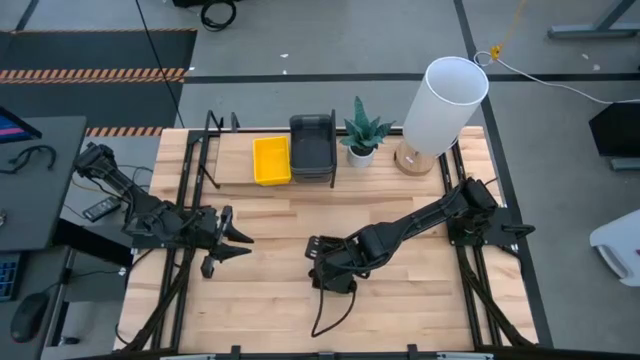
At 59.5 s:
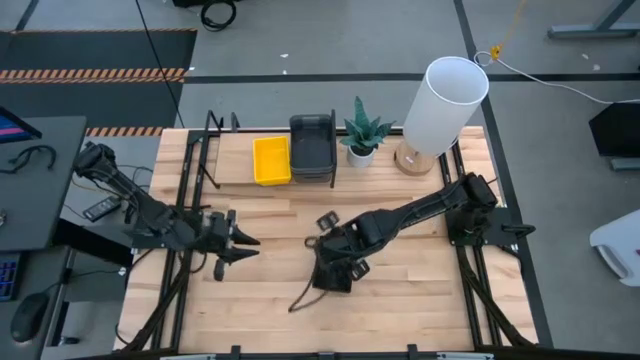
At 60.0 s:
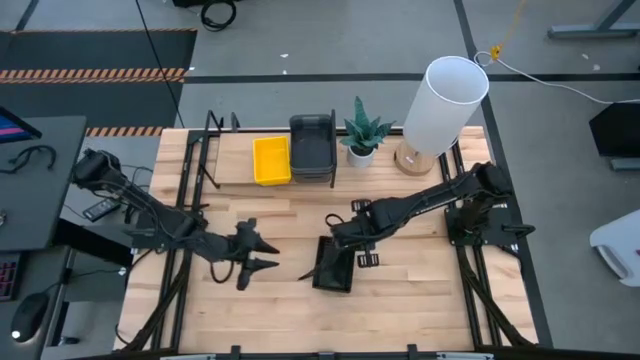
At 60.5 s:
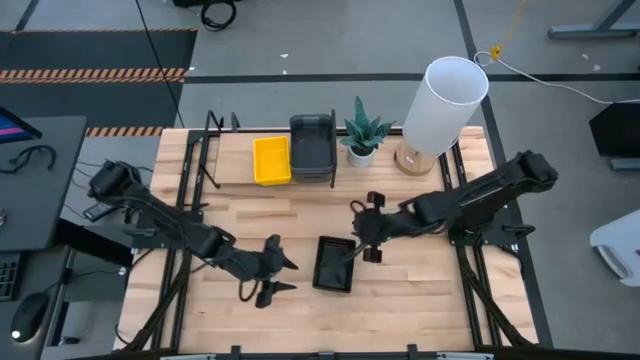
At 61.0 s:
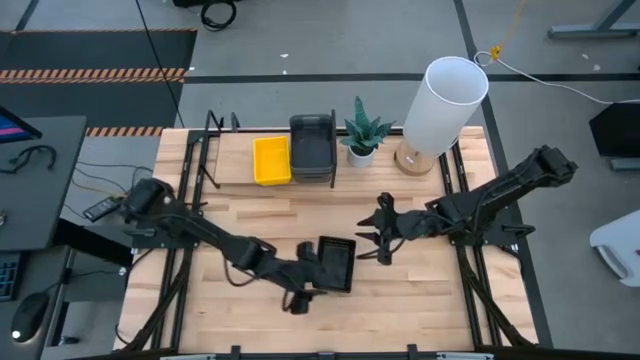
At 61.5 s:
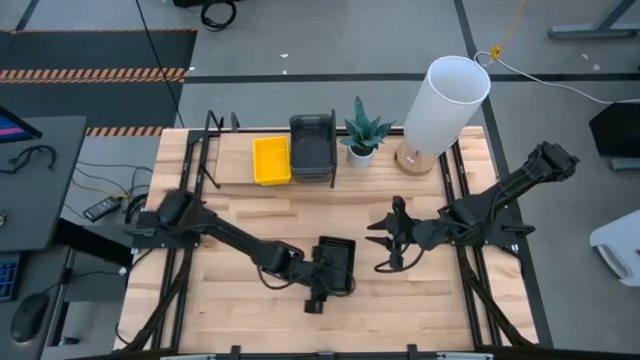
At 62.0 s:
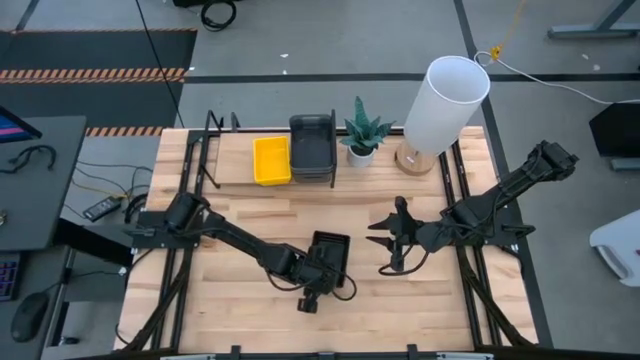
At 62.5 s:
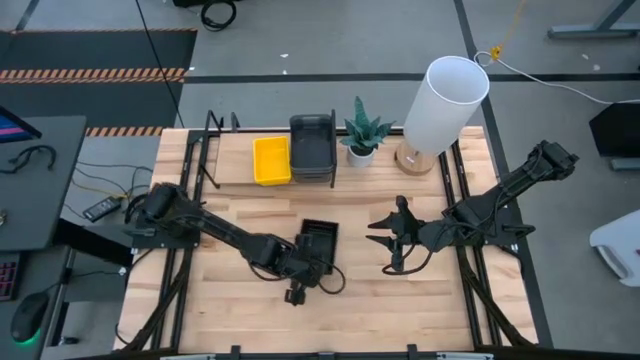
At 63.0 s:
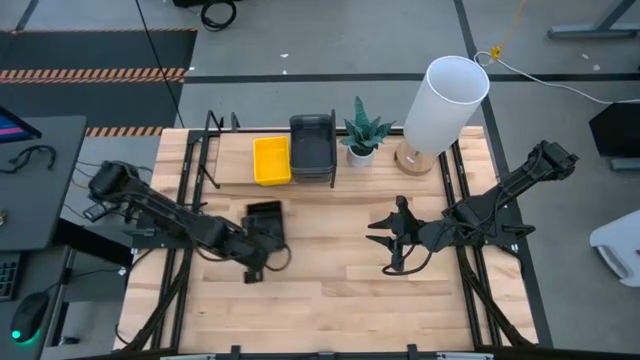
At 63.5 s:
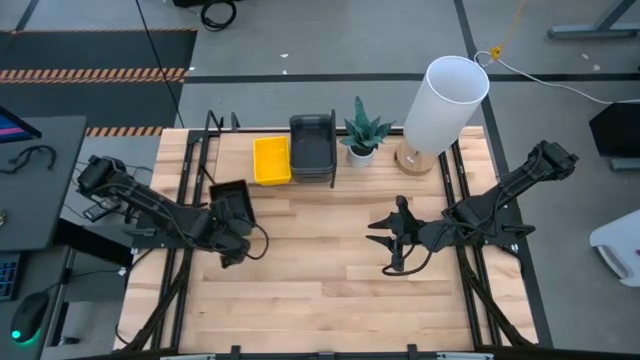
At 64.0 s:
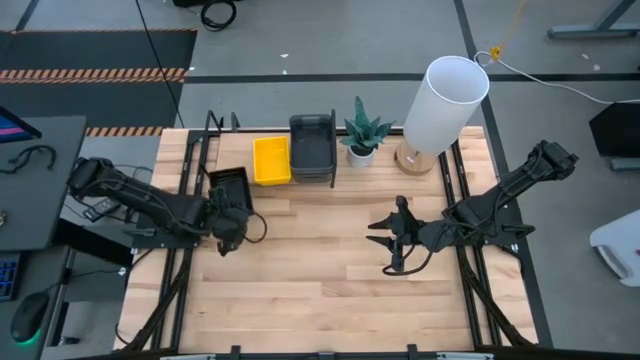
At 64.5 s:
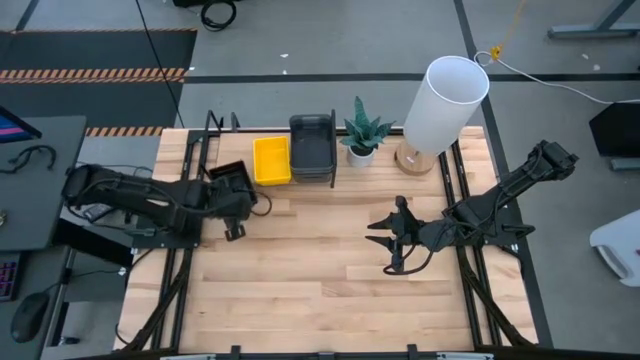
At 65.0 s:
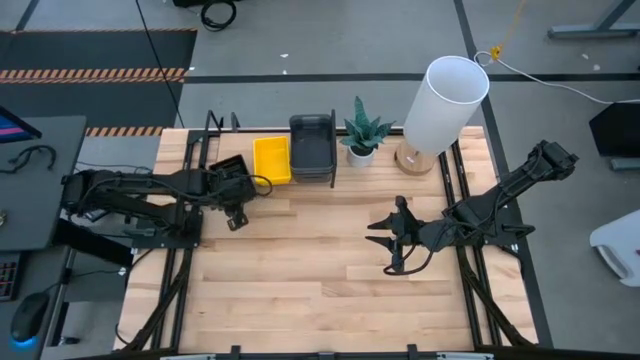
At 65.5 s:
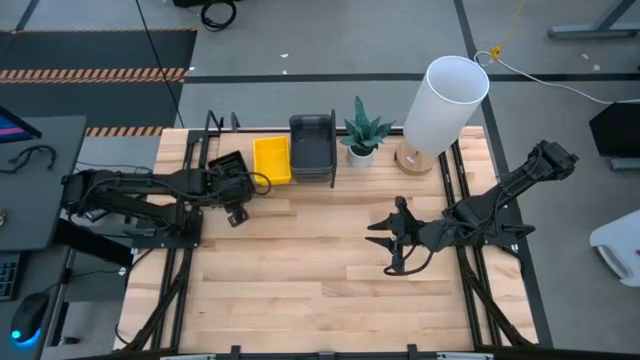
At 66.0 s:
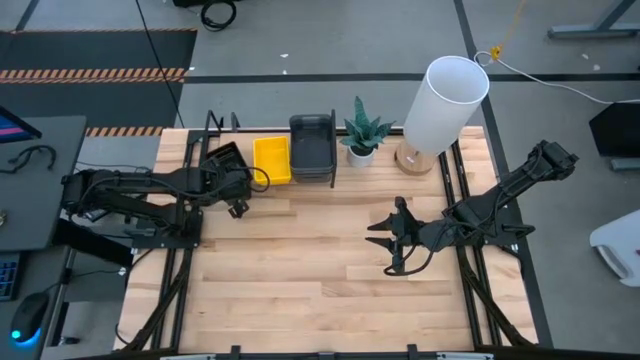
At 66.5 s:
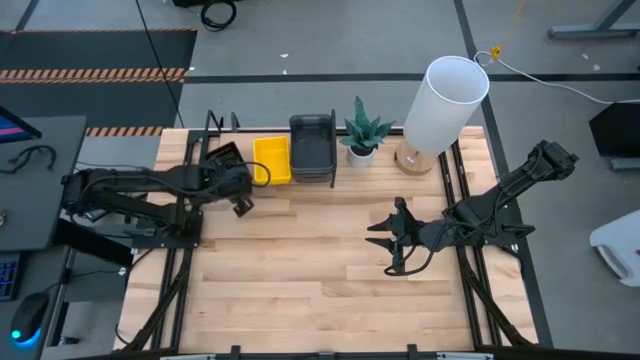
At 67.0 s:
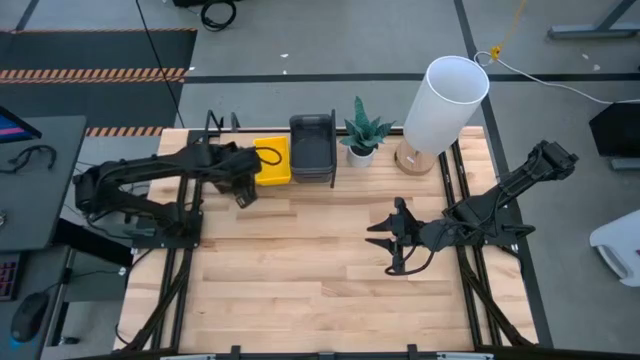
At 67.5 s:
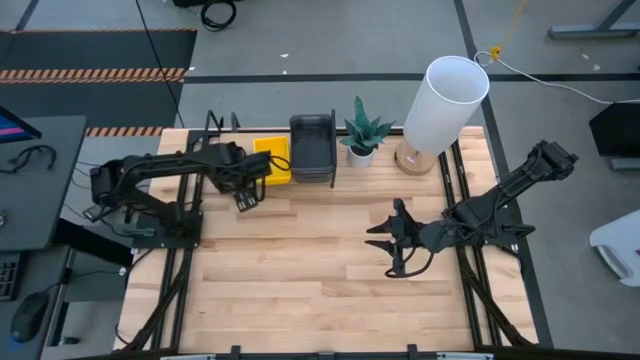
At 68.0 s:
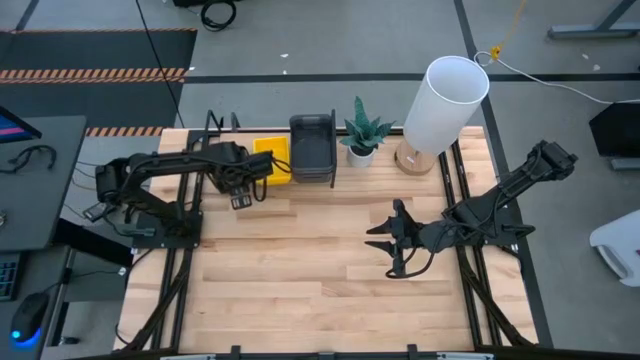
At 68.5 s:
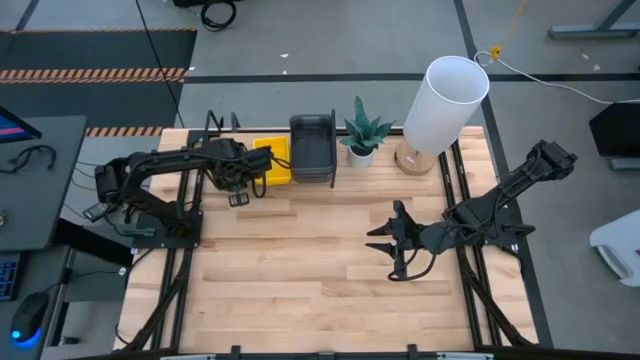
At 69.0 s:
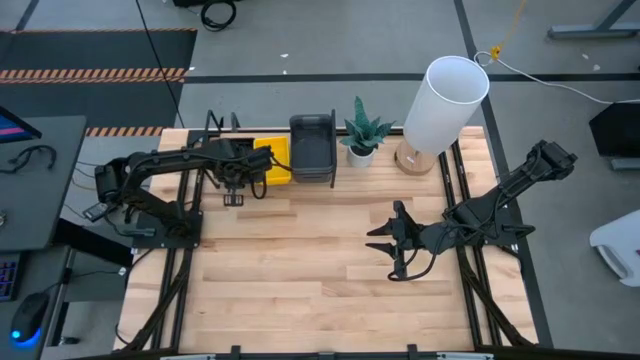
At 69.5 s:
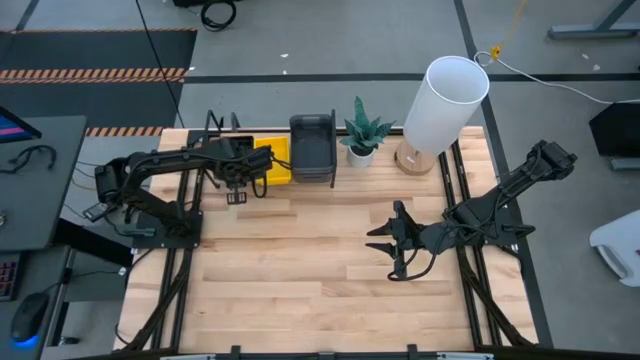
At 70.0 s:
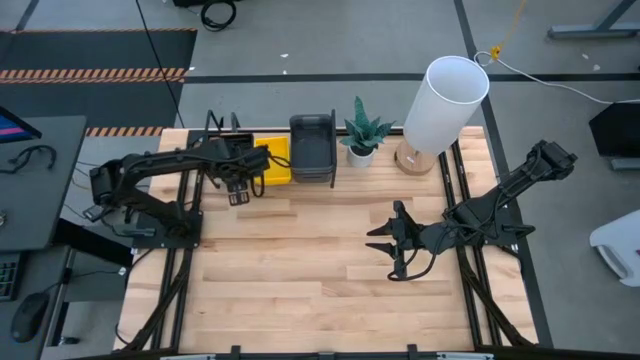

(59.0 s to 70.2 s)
Task: Stack baskets on shelf by color
Put the stacked black bins on the shelf

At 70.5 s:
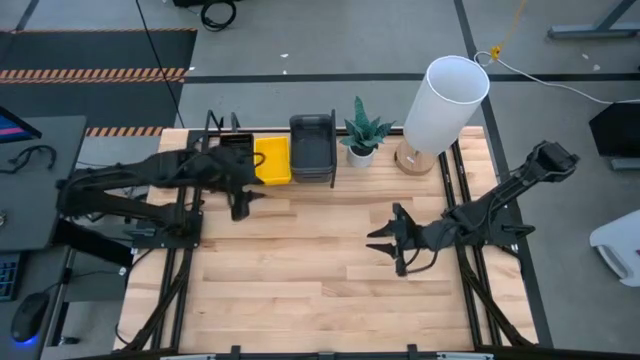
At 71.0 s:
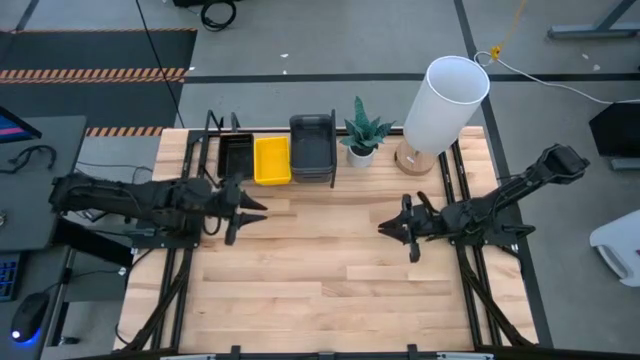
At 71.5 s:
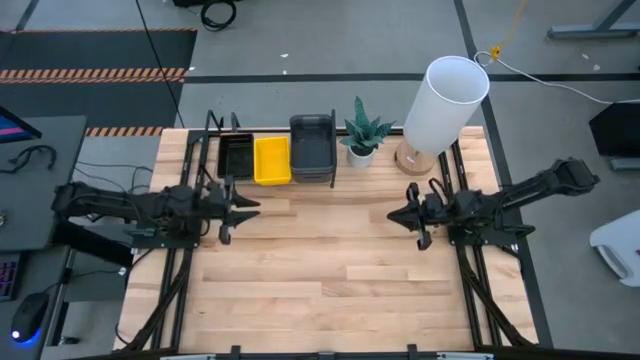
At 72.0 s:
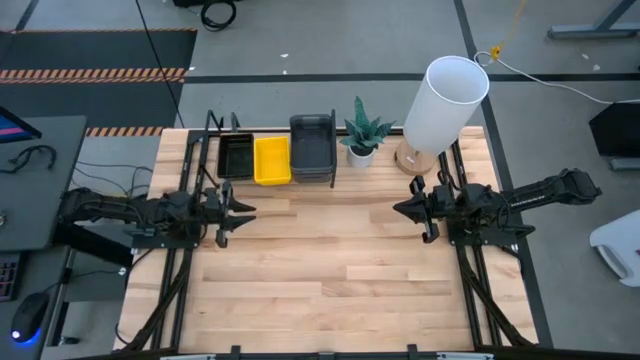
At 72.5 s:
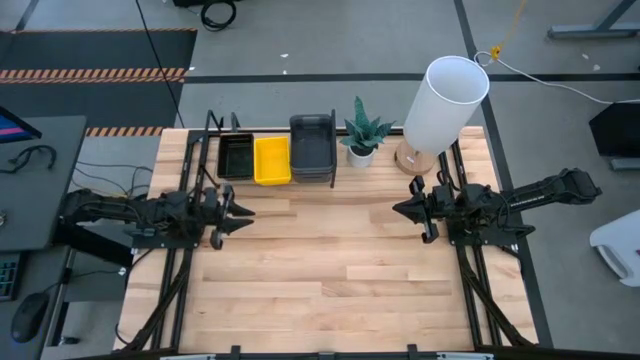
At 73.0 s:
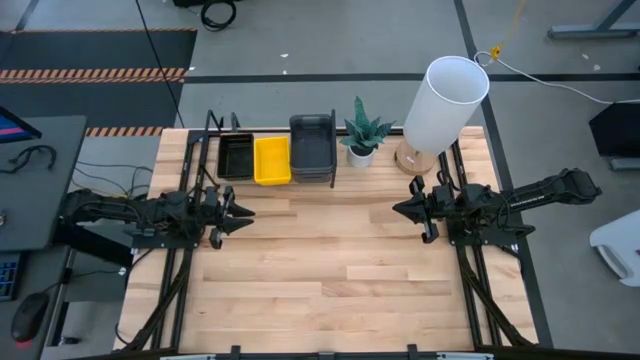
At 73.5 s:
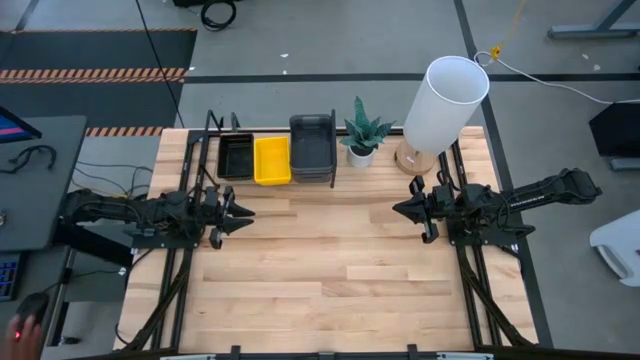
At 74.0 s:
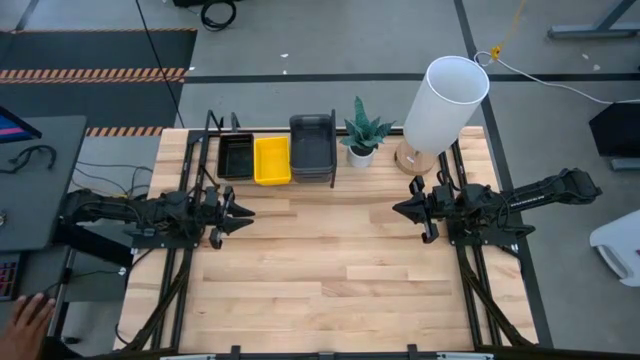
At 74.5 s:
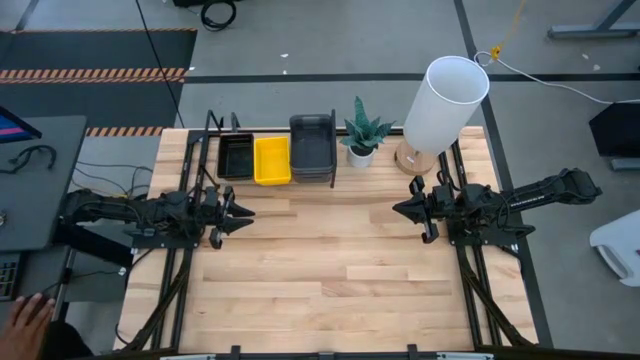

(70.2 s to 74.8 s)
Return to Home Position

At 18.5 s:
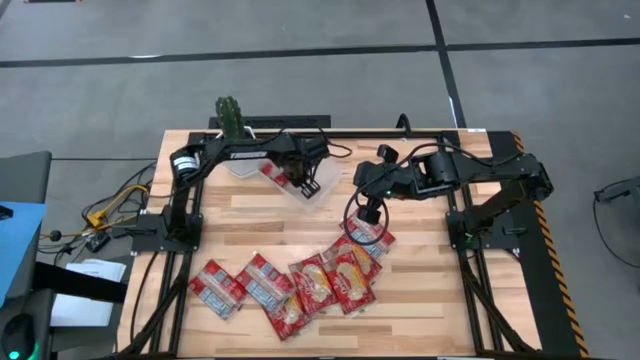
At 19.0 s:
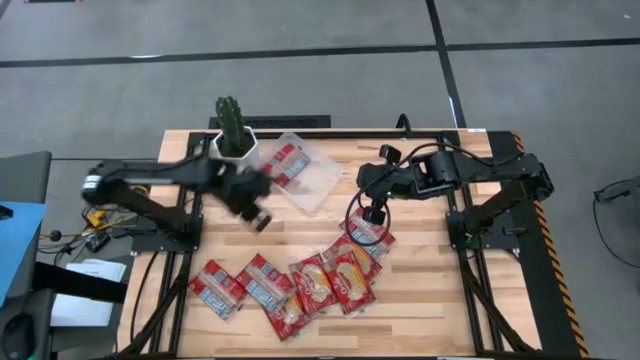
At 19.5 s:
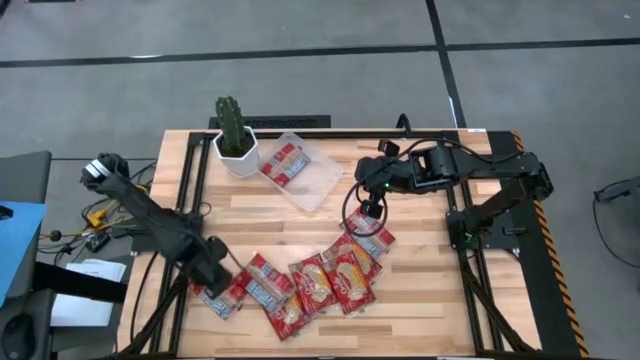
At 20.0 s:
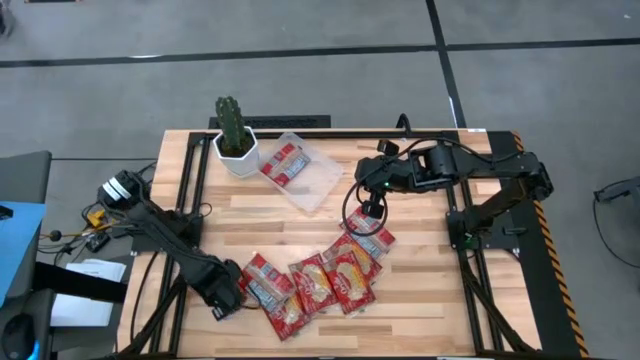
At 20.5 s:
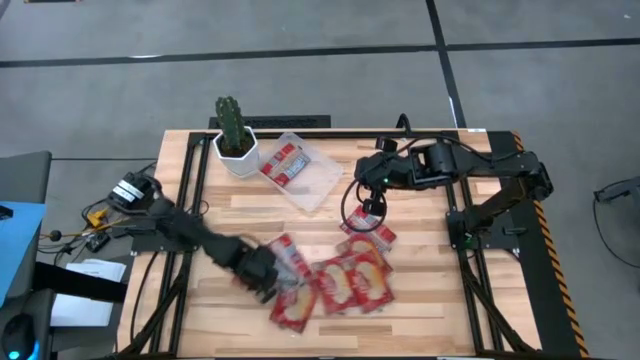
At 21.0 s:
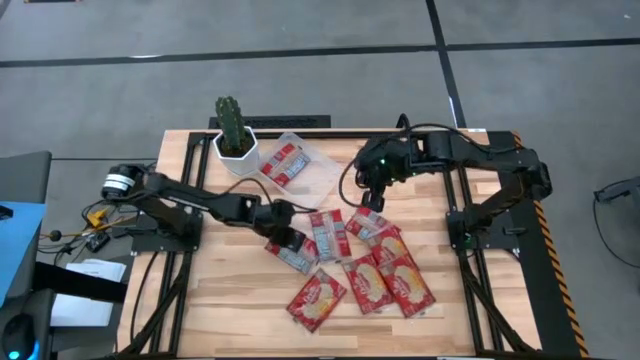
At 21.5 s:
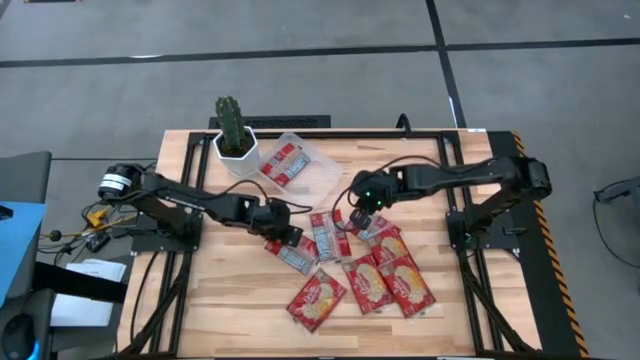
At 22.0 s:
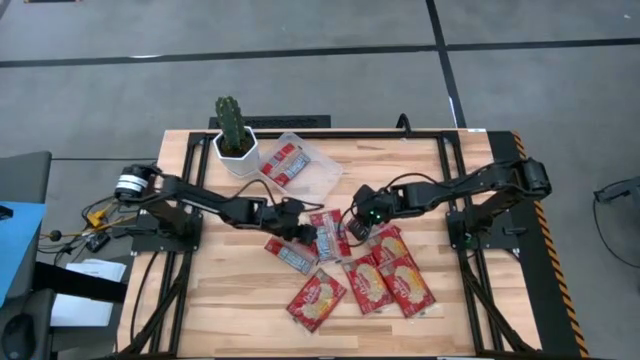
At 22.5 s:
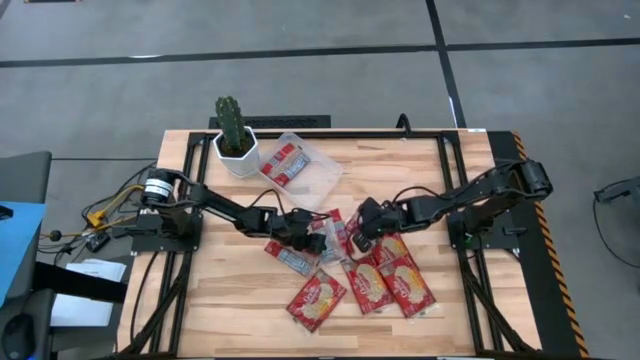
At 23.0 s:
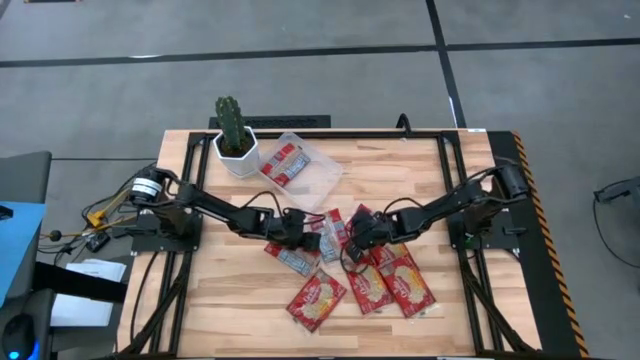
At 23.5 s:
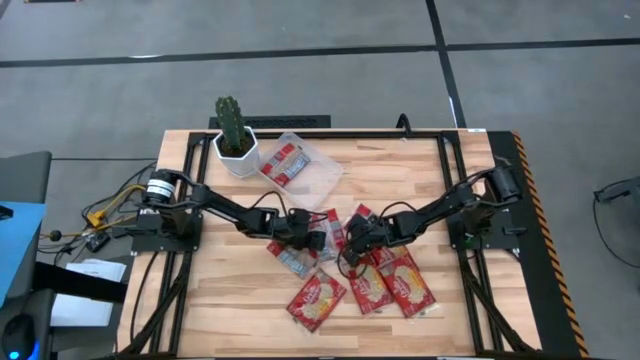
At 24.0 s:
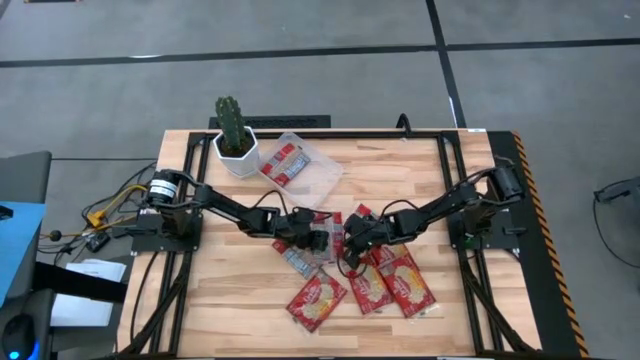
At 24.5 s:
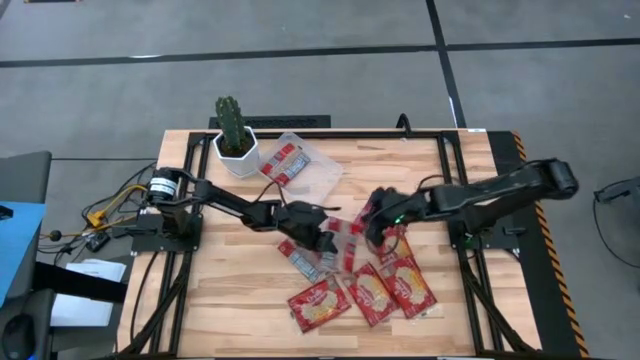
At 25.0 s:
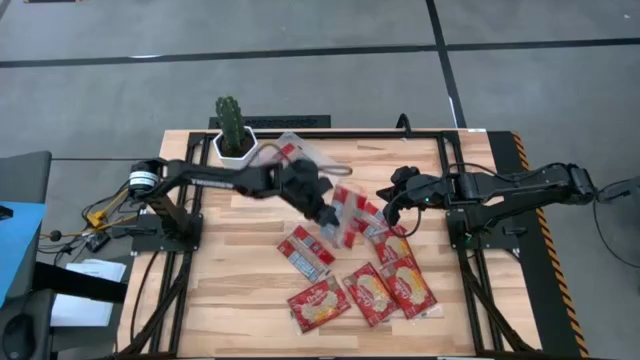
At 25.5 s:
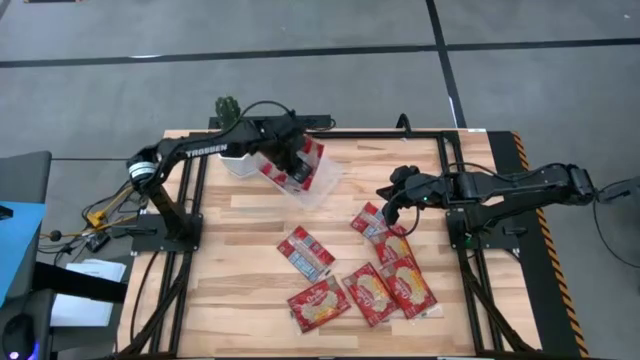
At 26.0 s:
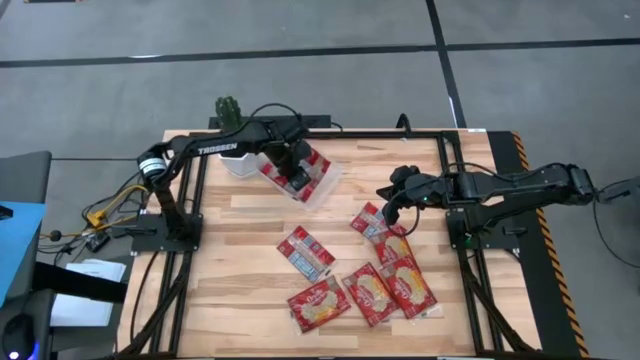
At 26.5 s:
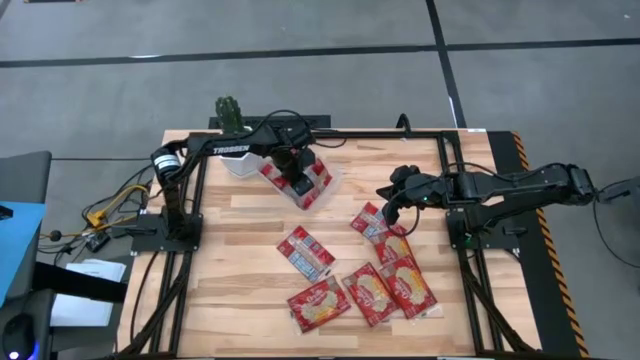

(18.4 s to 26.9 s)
Task: Sort popcorn bags into baskets
Put the red popcorn bag into the transparent bin
